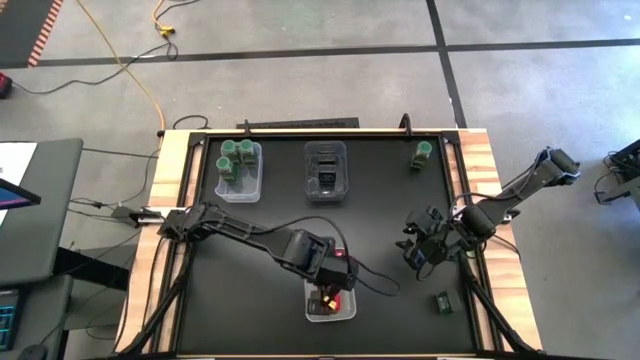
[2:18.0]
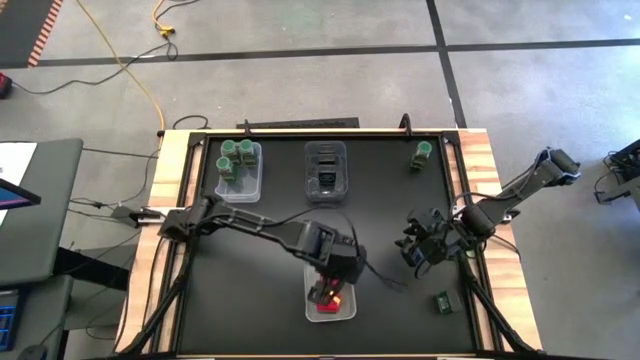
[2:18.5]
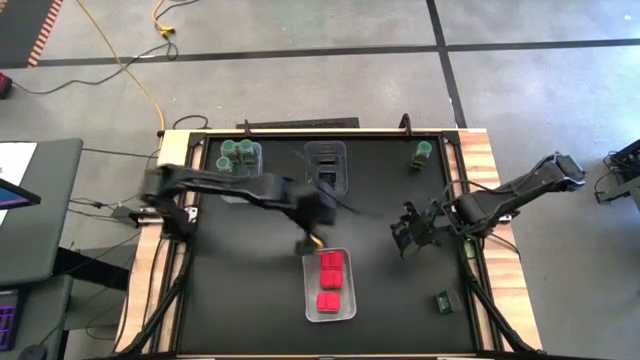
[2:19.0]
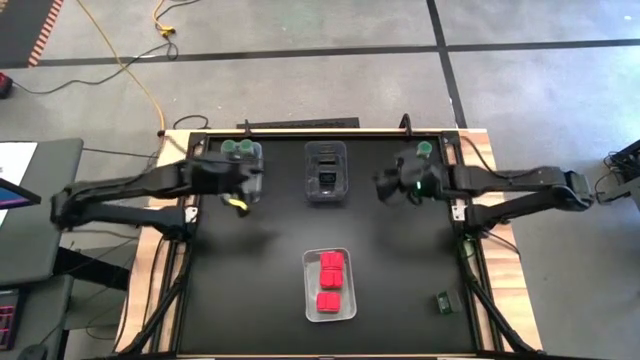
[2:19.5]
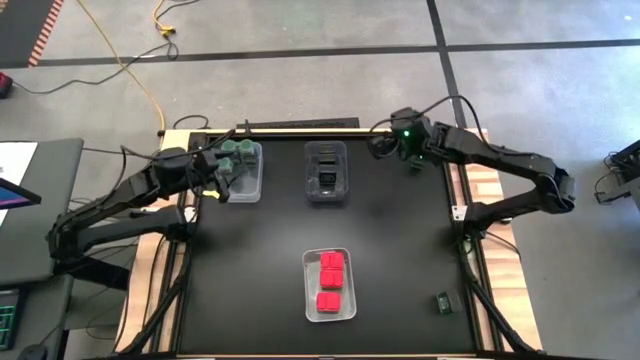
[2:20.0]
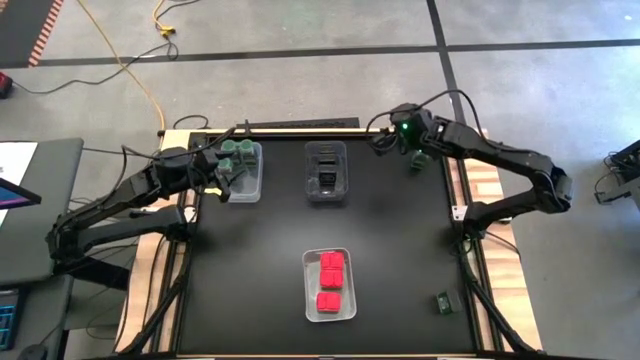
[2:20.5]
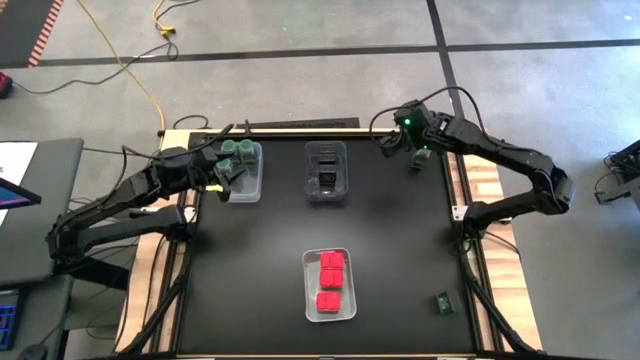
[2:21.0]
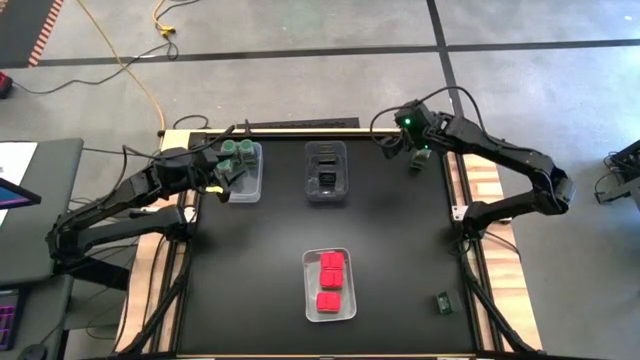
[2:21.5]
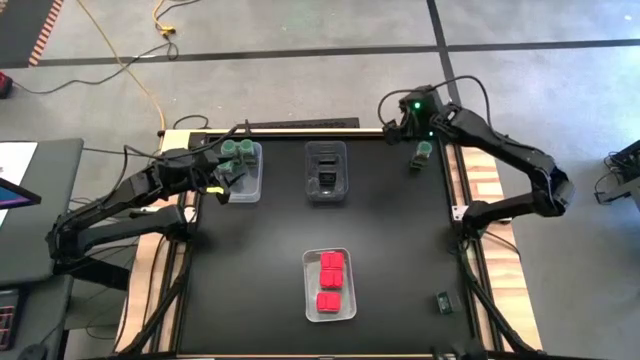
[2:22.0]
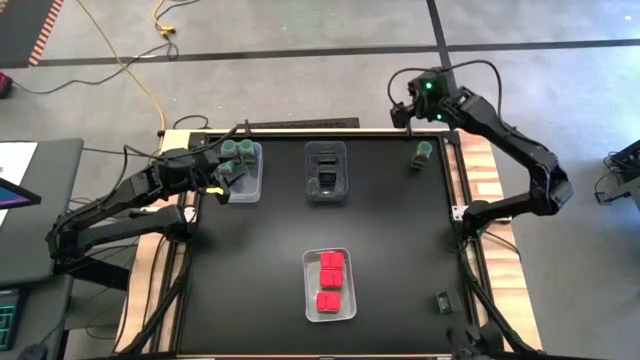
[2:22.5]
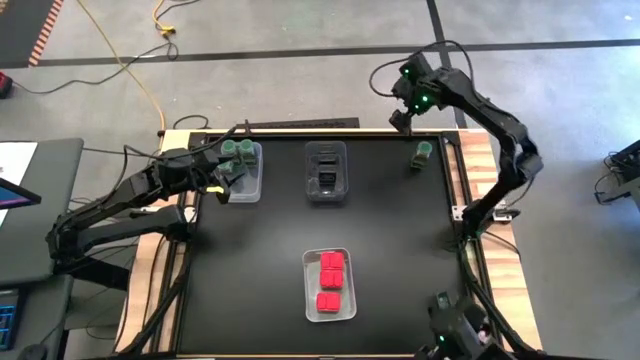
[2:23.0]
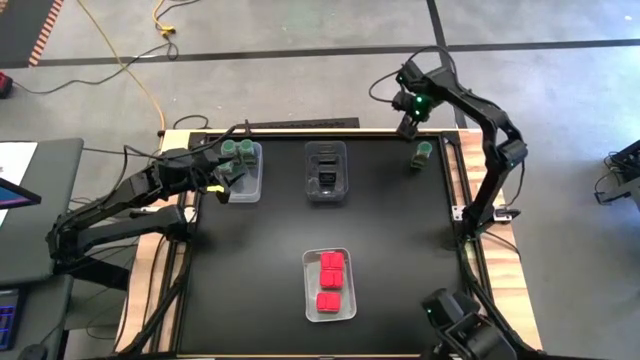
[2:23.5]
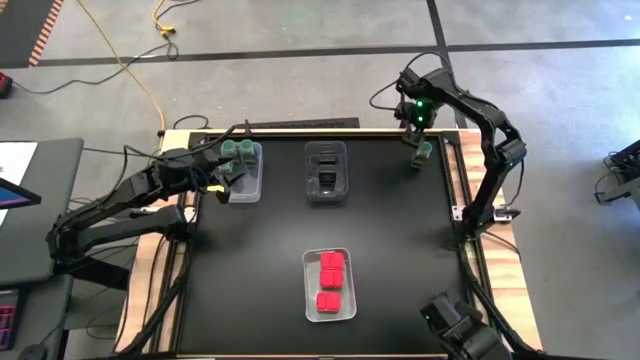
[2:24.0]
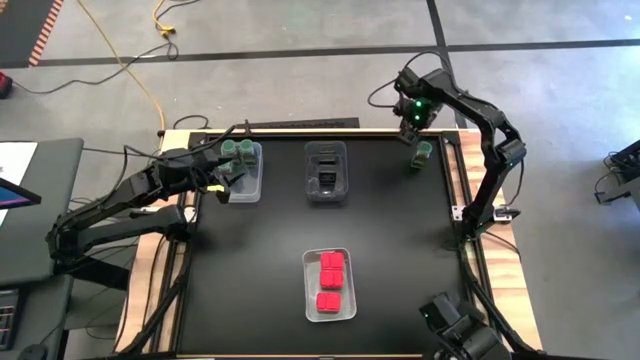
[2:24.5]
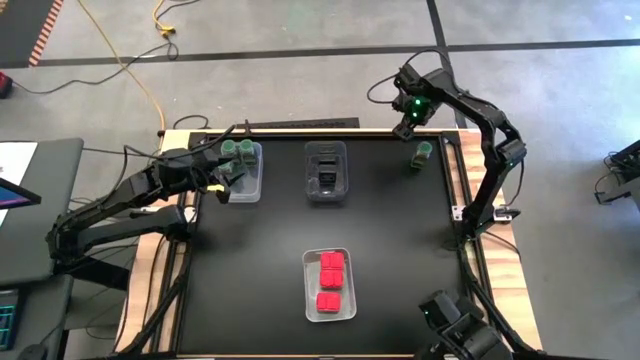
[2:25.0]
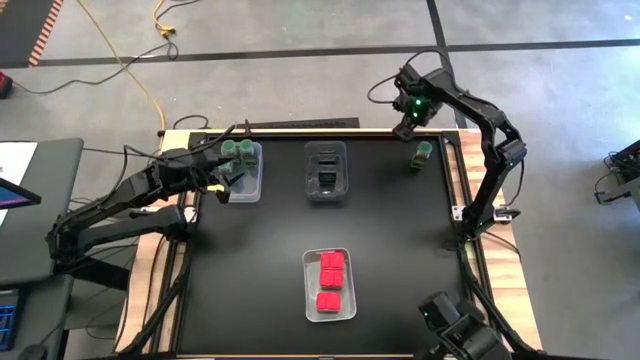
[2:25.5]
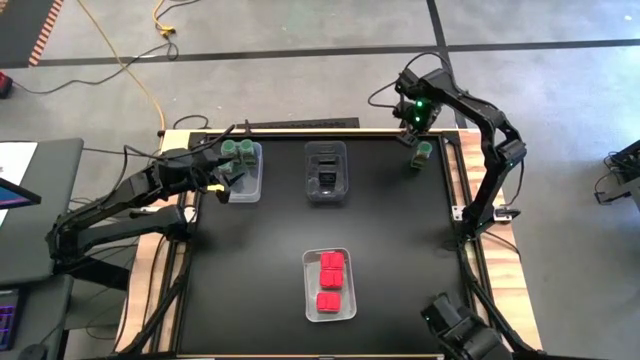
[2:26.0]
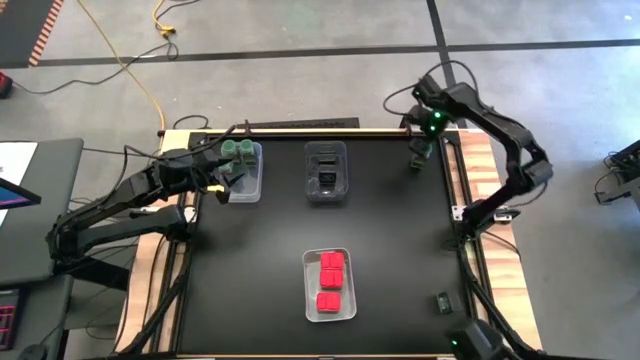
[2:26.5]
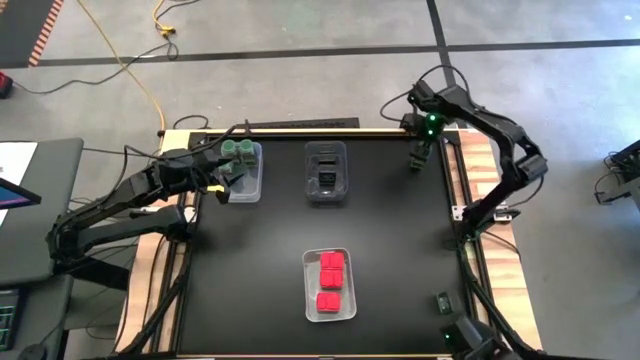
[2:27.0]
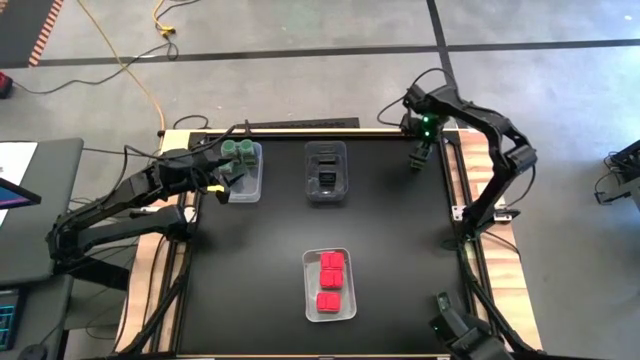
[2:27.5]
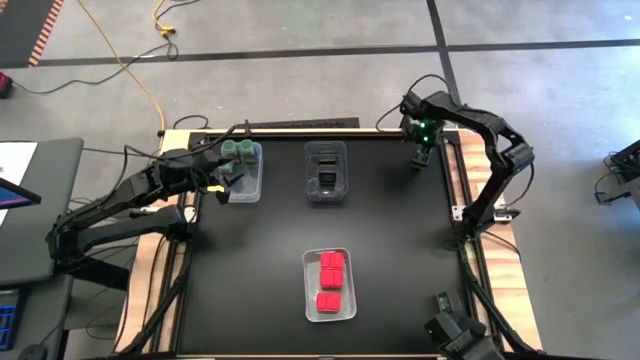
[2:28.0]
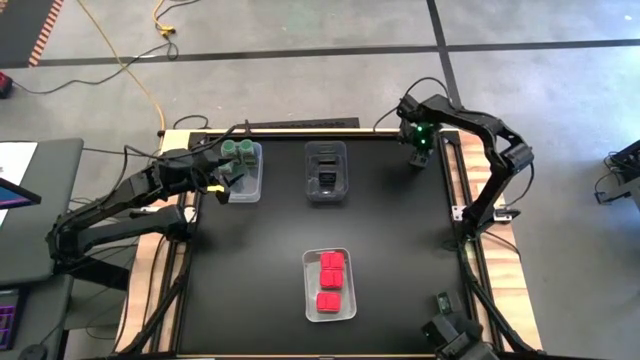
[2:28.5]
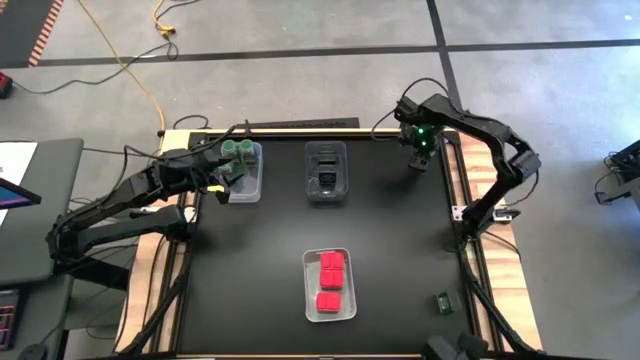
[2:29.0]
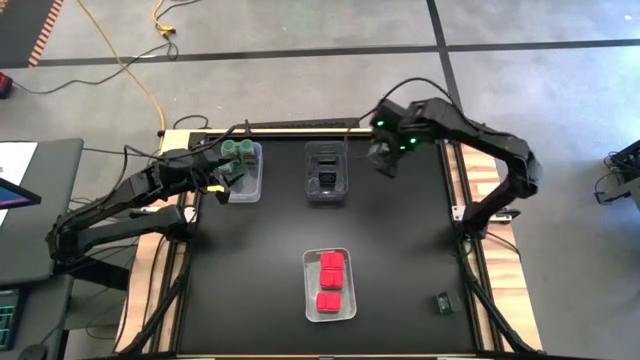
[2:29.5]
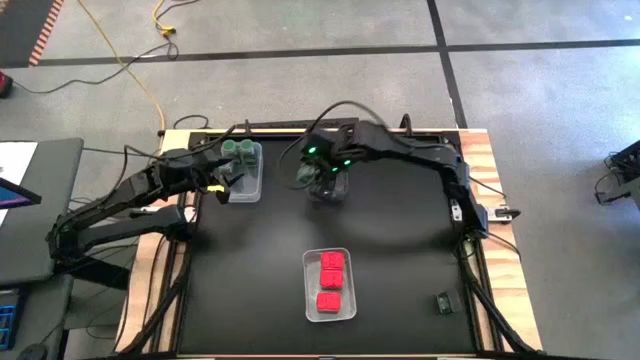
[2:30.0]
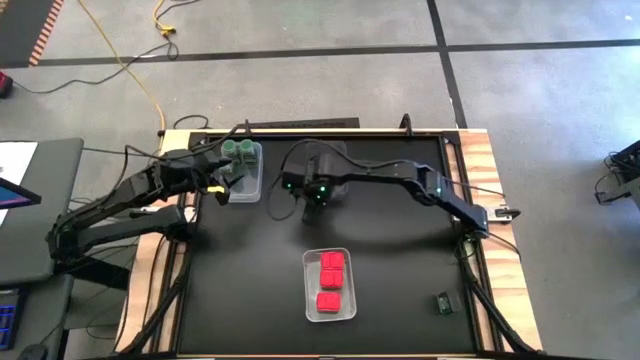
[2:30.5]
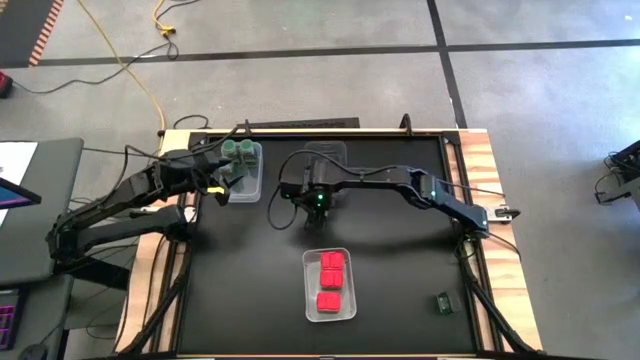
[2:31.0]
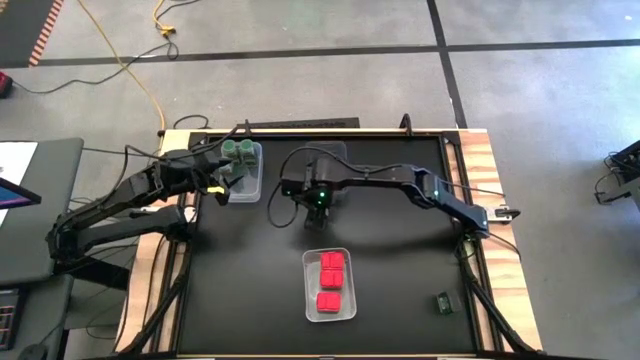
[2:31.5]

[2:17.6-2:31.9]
Task: Sort spices by type
Put the green seasoning bottle into the transparent bin

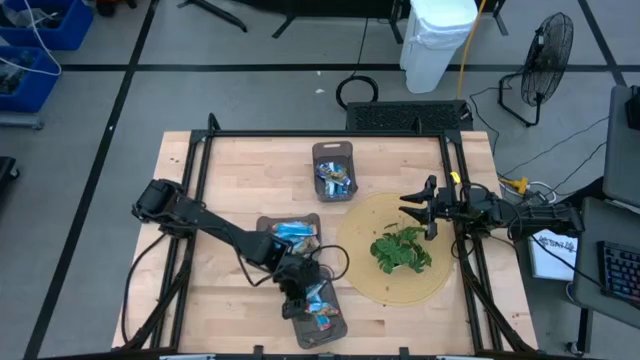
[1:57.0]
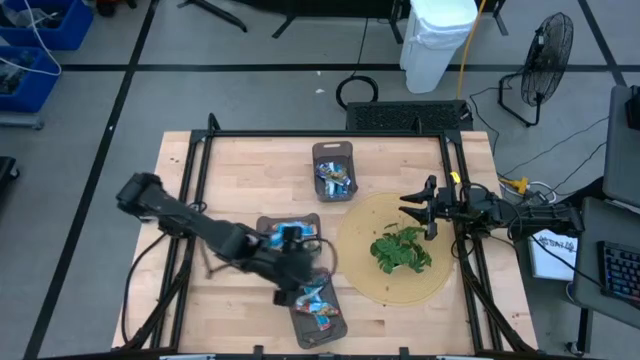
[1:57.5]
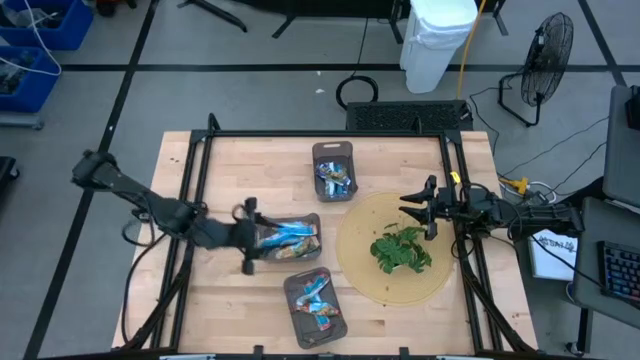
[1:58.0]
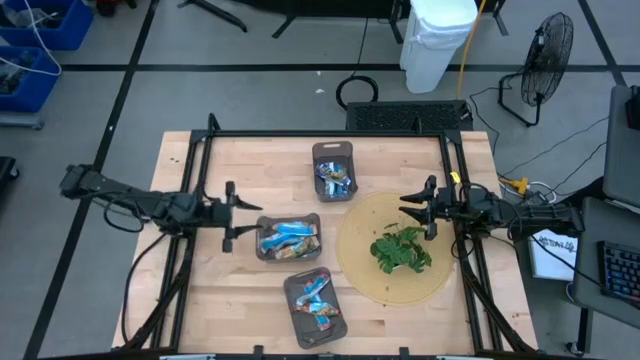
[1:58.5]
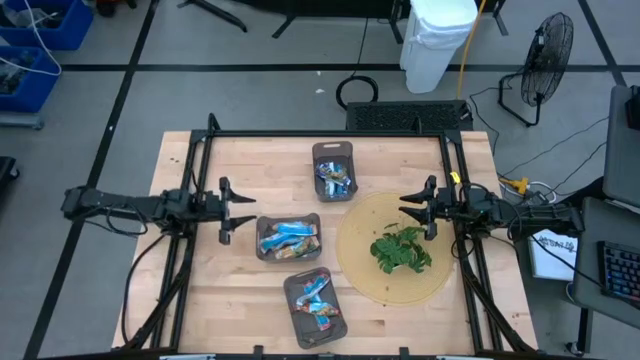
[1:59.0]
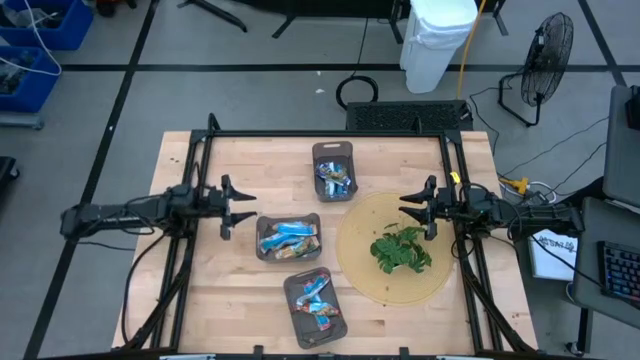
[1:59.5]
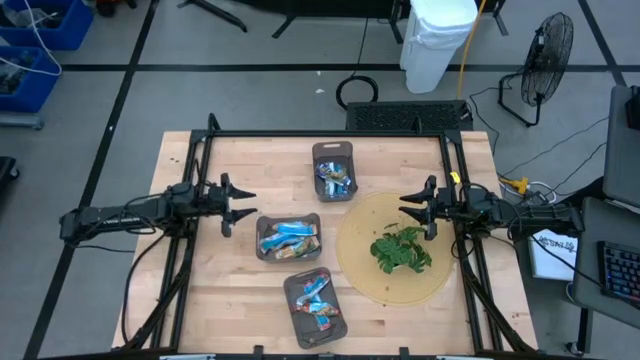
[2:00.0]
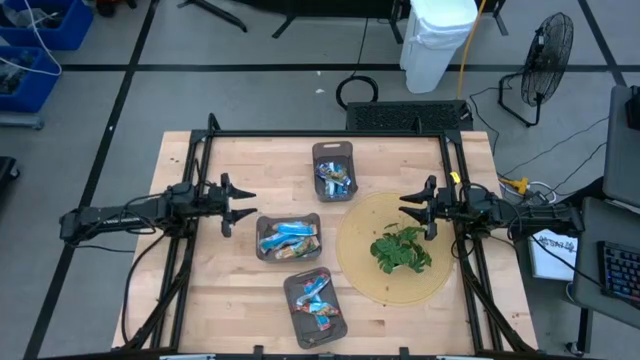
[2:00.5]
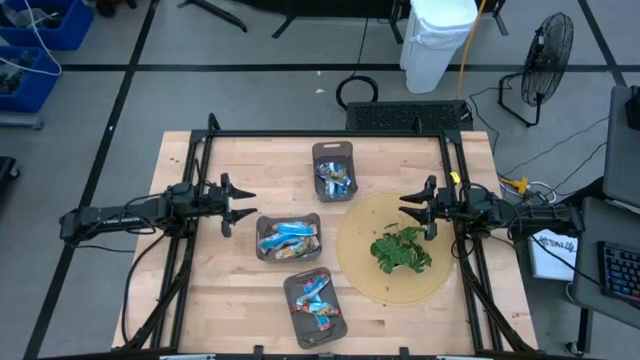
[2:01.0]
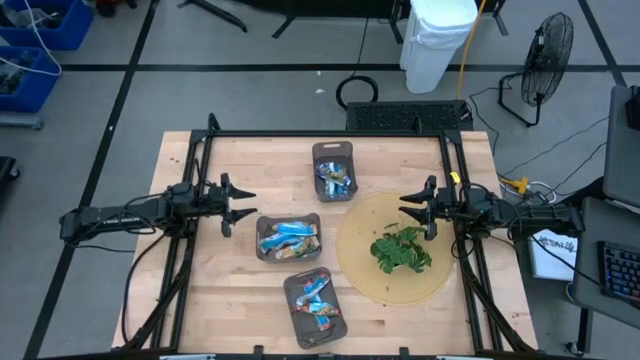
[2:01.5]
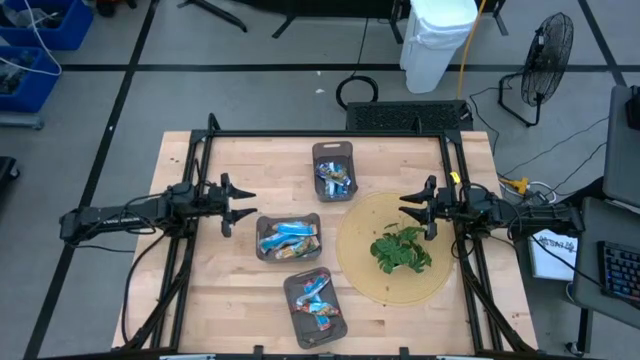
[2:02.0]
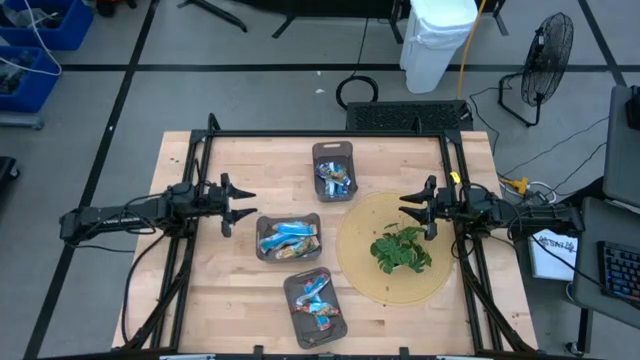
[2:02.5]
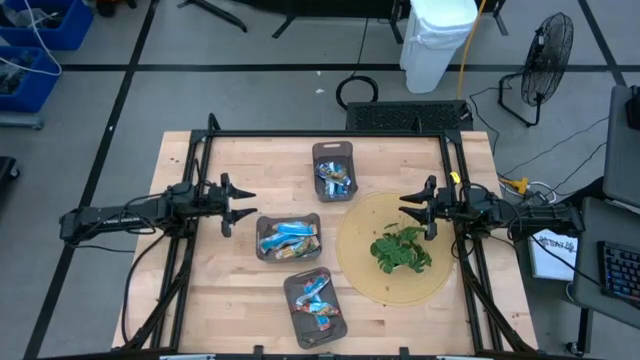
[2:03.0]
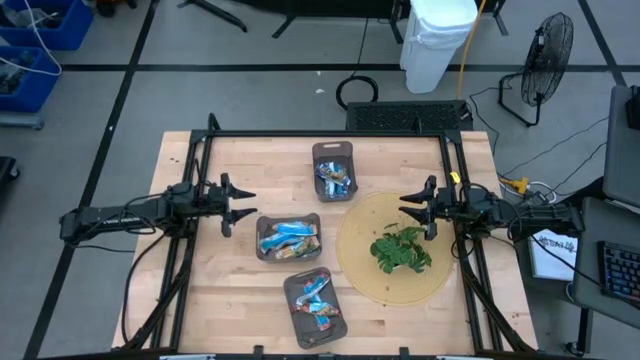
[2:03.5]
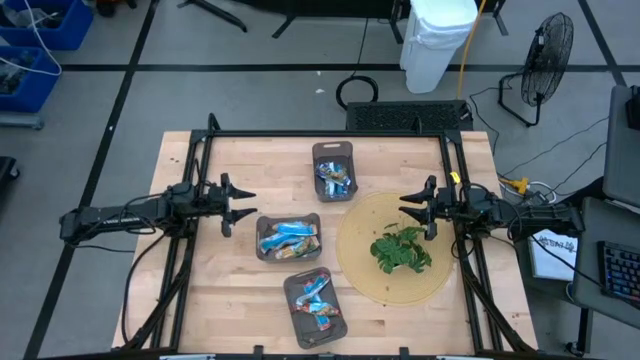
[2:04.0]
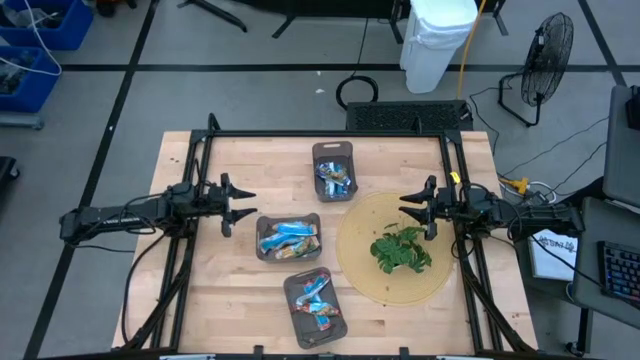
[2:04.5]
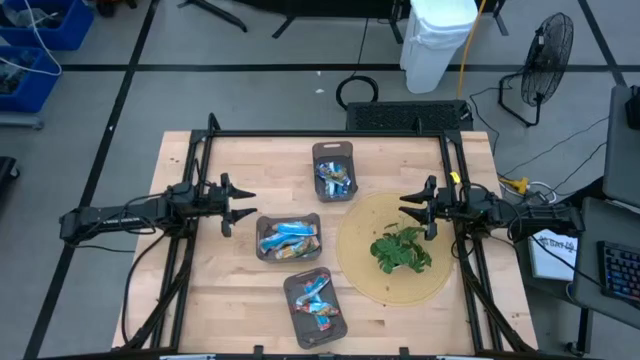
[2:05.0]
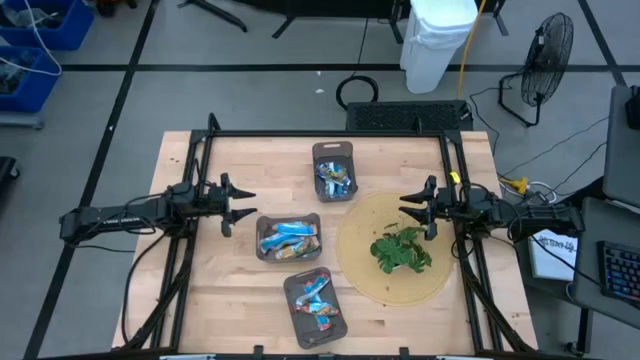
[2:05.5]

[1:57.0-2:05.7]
Task: Pick and place Granola Bars by type
Return to Home Position
